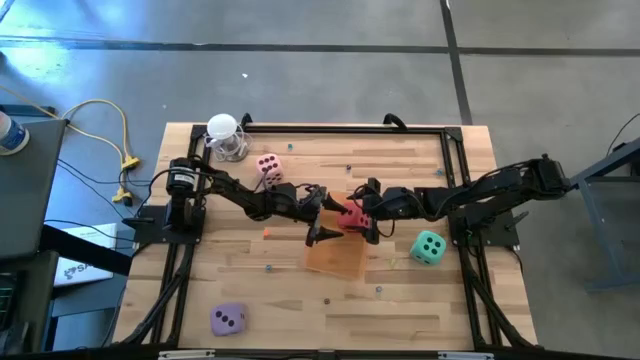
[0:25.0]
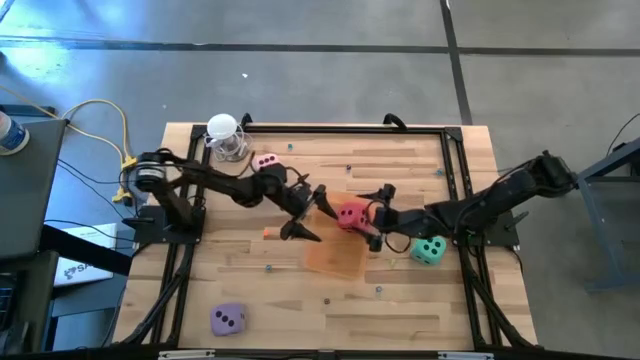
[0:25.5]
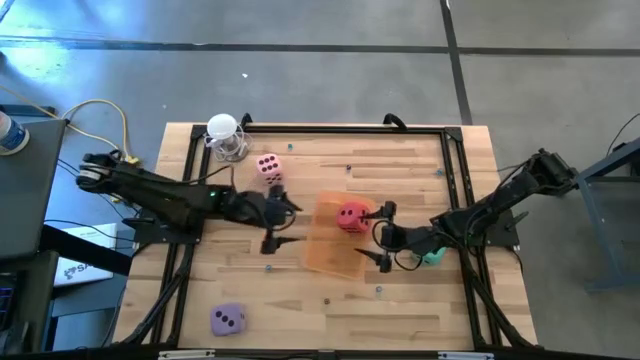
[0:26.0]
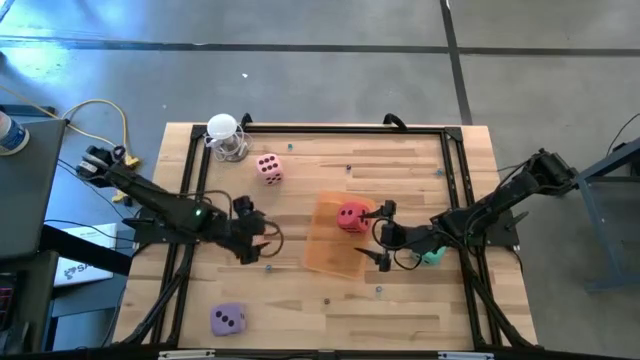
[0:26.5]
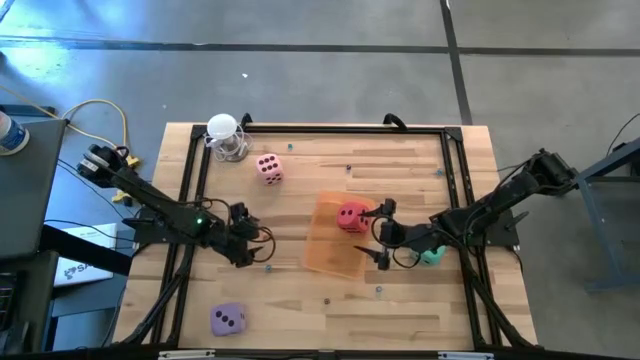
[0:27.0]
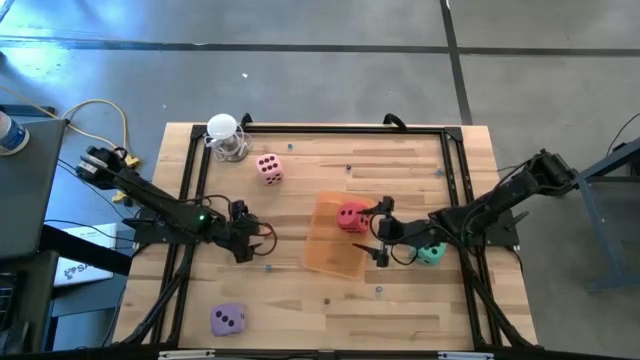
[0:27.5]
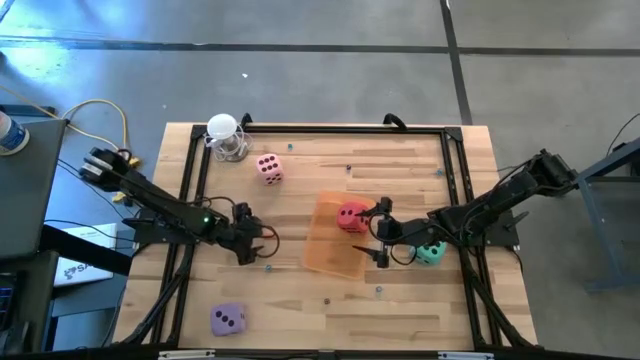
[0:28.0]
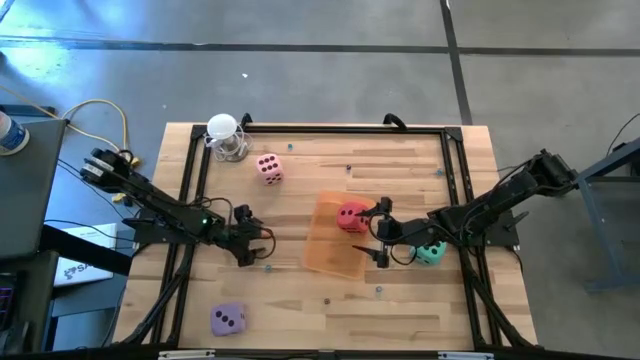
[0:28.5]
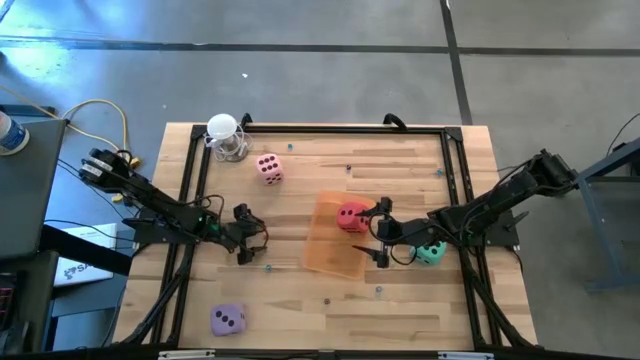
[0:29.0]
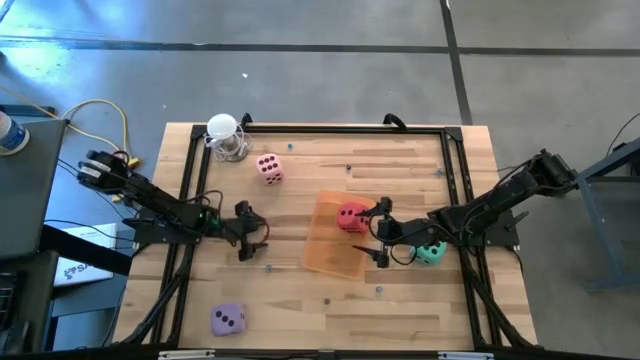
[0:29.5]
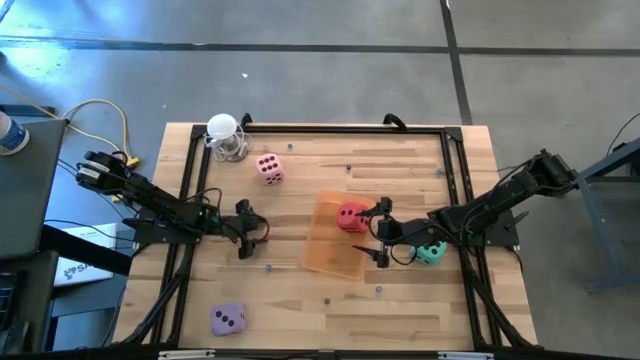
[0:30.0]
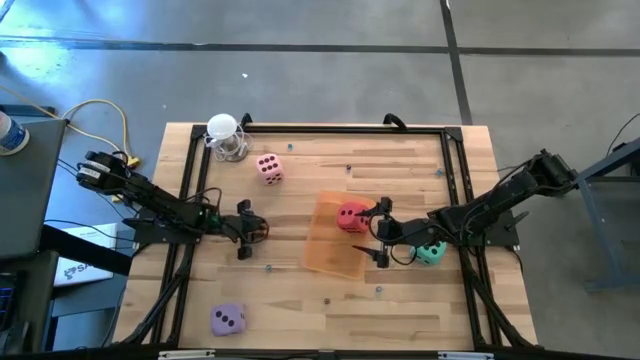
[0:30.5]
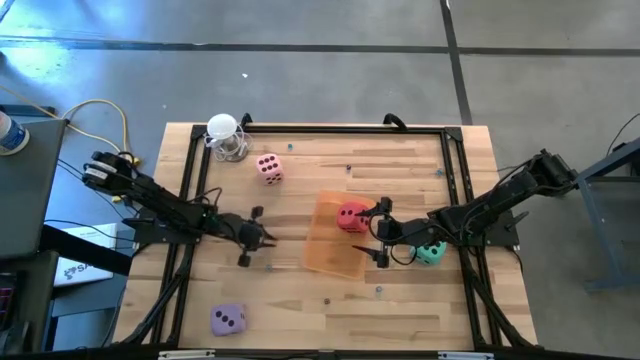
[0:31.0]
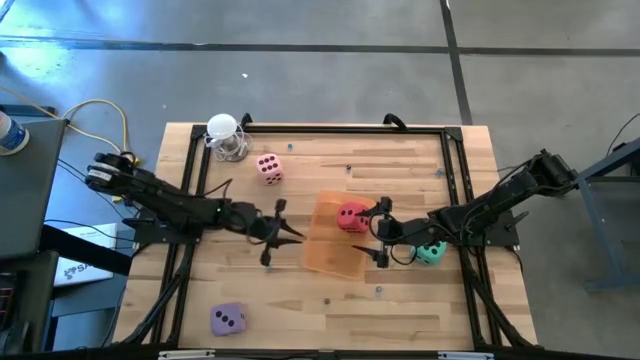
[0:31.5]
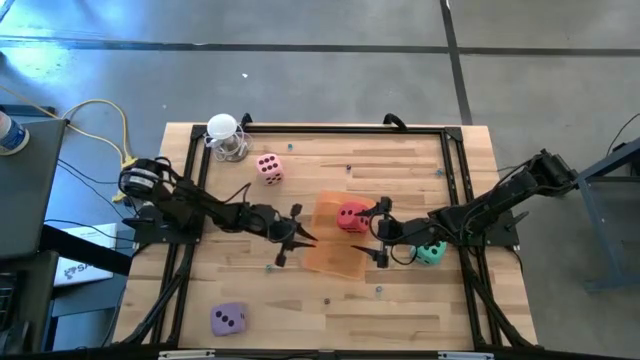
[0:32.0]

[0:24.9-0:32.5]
Task: Pick & Place Dice
Put the small orange die into the orange bin

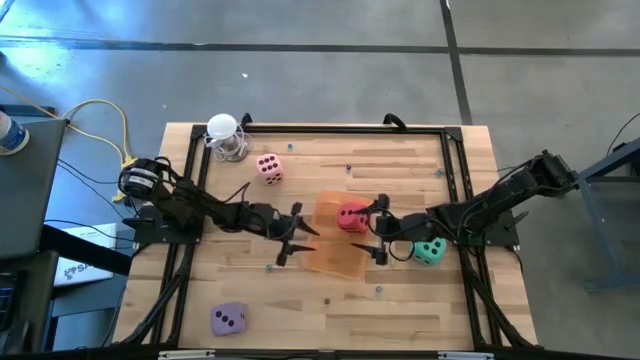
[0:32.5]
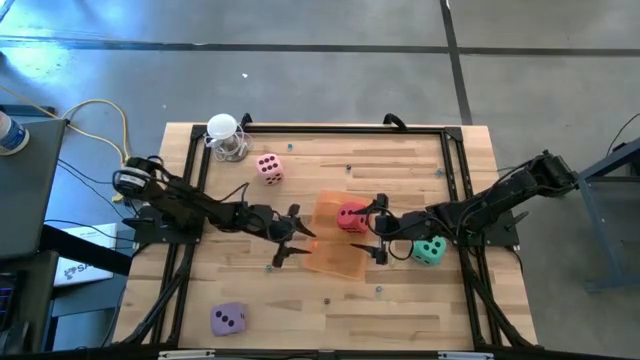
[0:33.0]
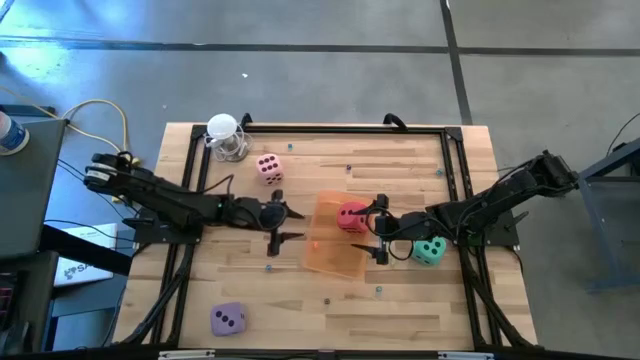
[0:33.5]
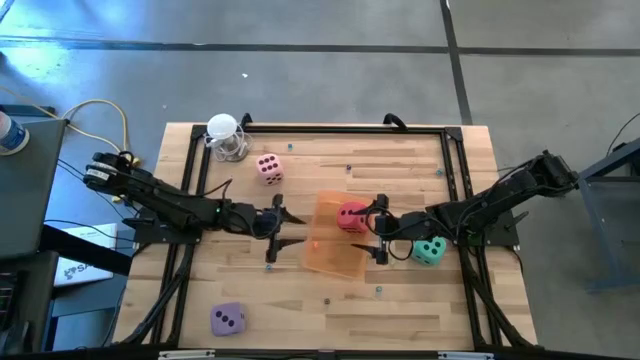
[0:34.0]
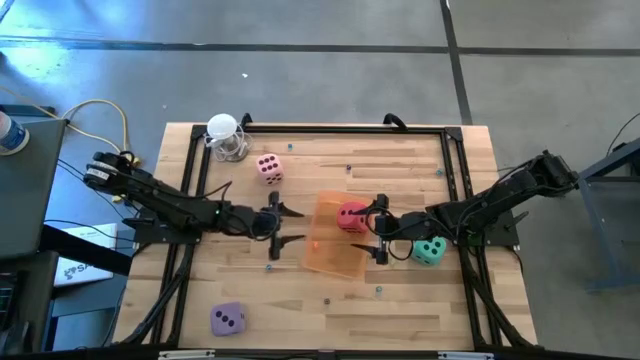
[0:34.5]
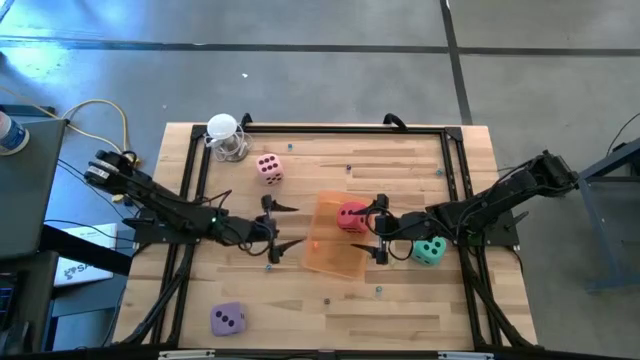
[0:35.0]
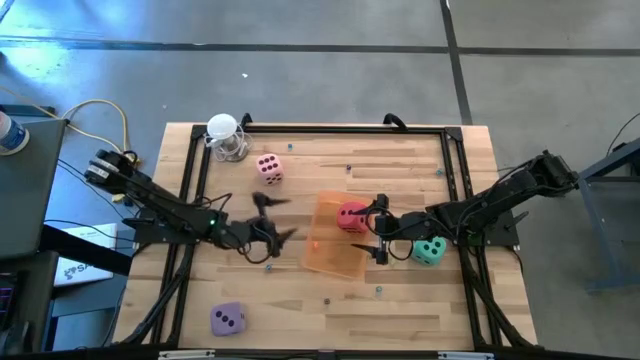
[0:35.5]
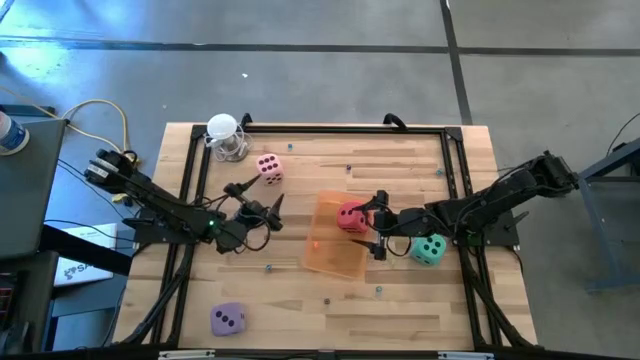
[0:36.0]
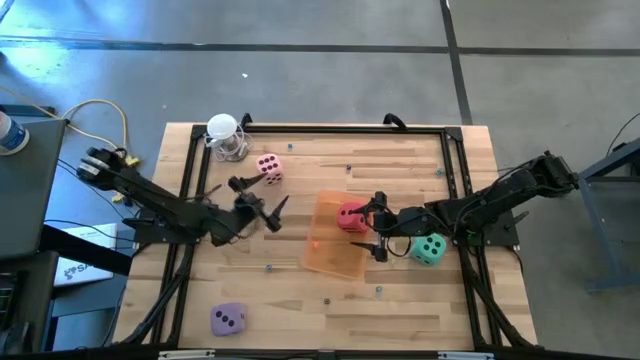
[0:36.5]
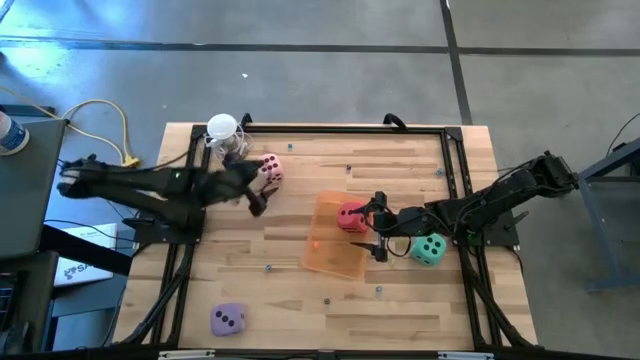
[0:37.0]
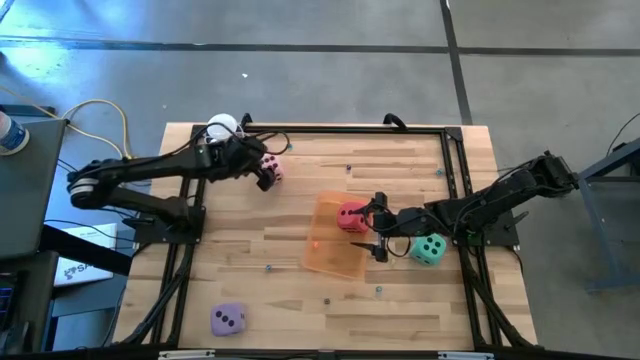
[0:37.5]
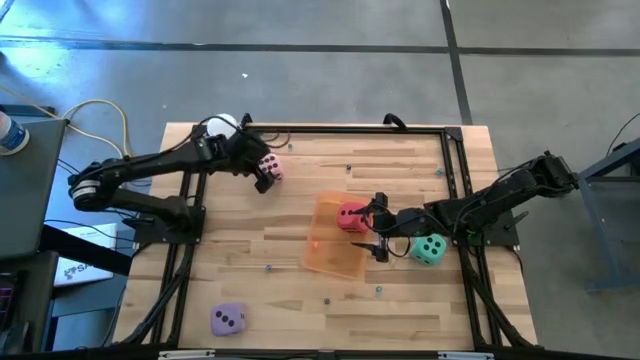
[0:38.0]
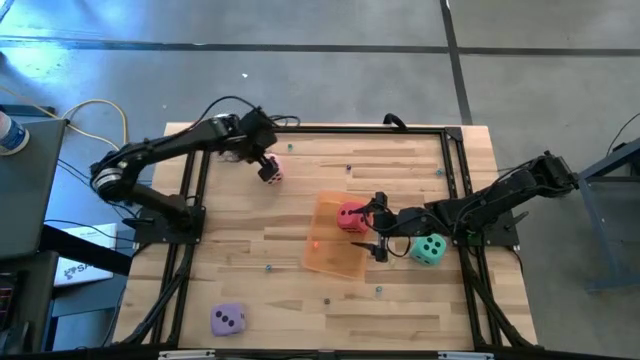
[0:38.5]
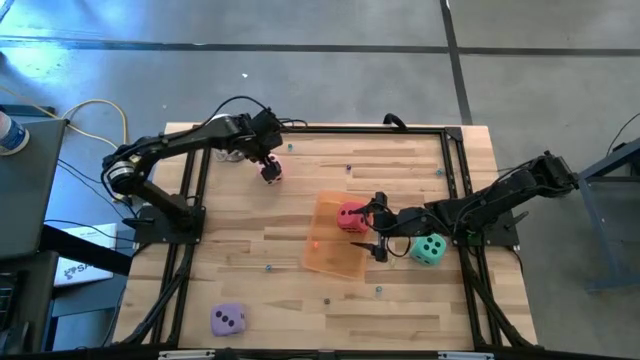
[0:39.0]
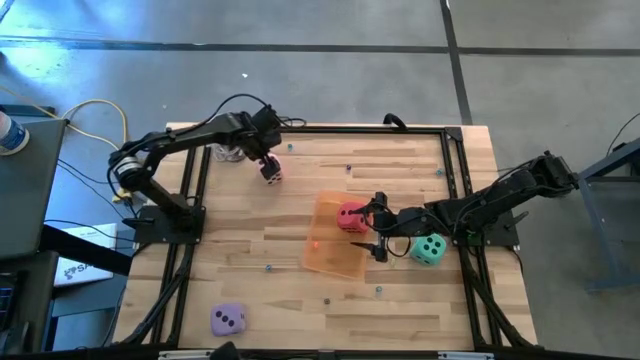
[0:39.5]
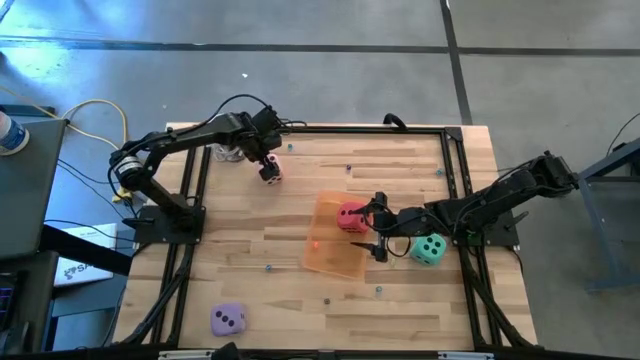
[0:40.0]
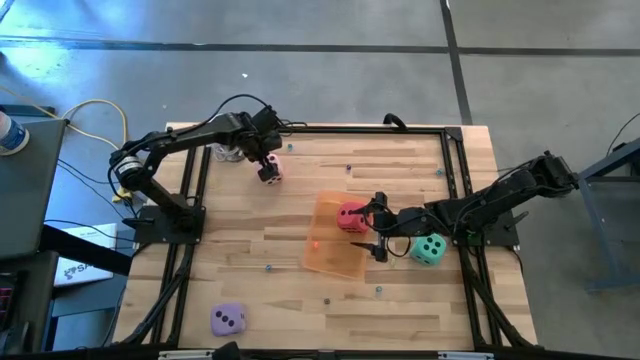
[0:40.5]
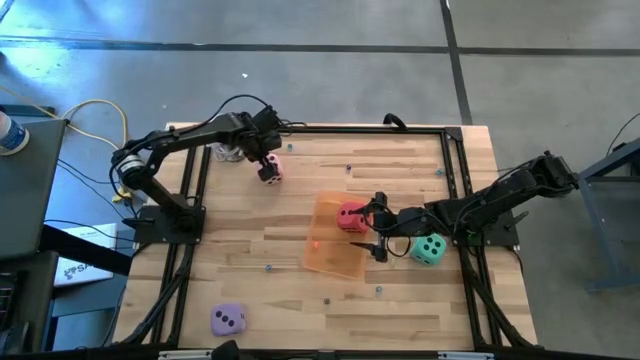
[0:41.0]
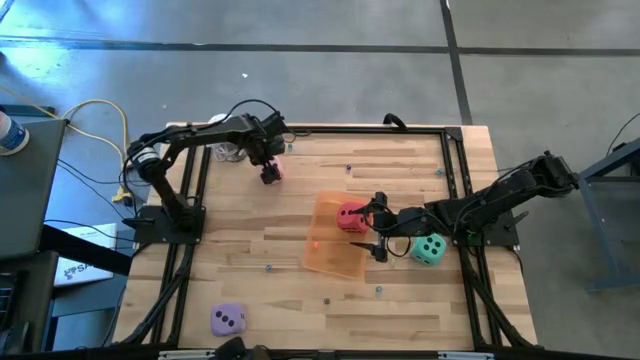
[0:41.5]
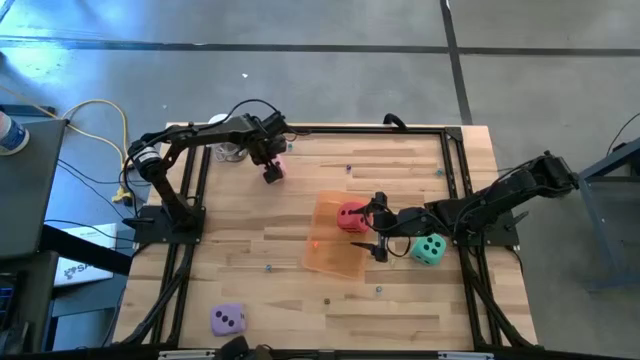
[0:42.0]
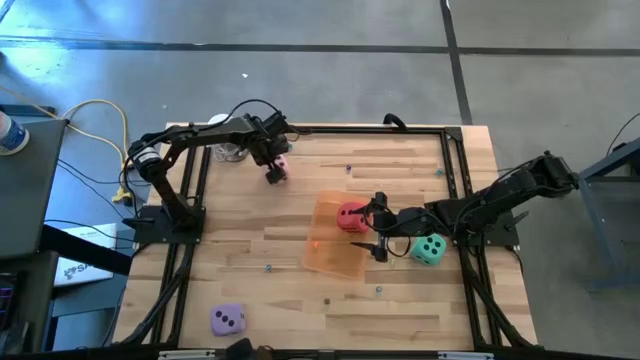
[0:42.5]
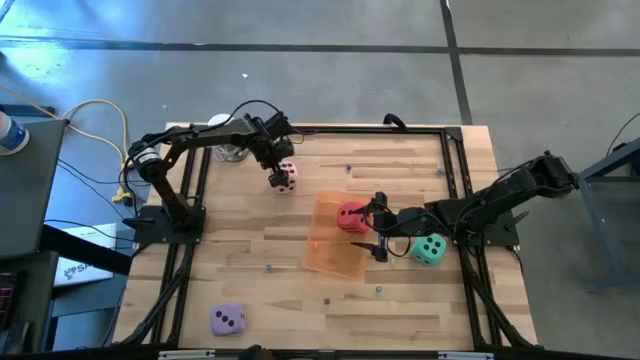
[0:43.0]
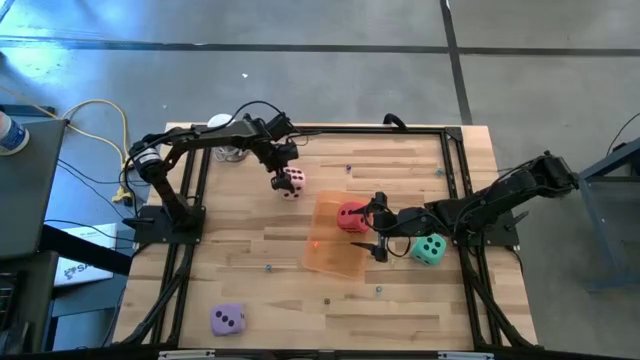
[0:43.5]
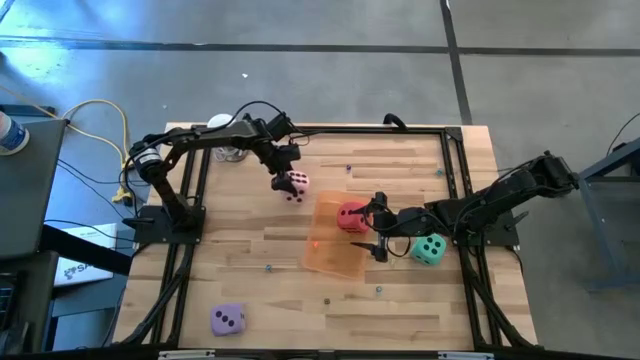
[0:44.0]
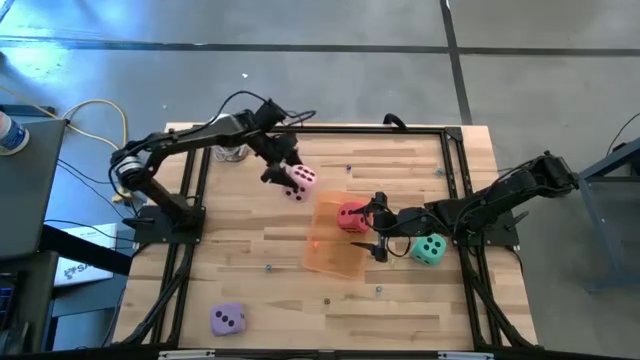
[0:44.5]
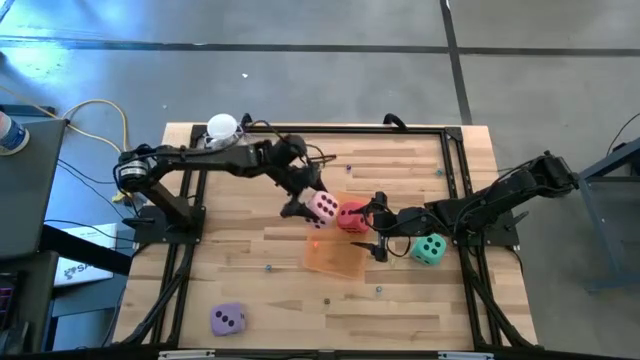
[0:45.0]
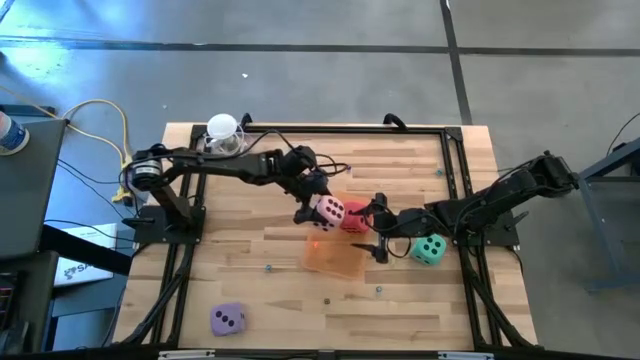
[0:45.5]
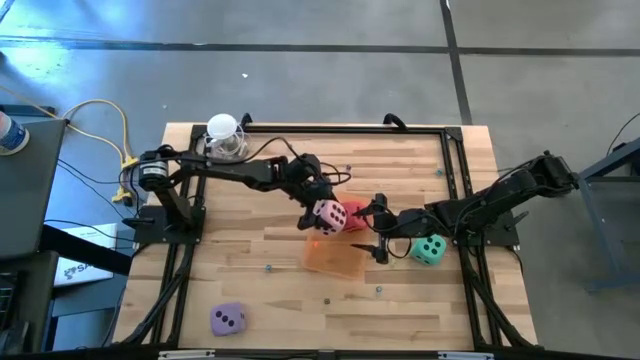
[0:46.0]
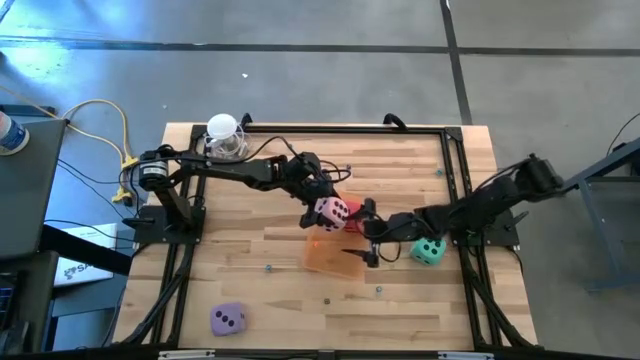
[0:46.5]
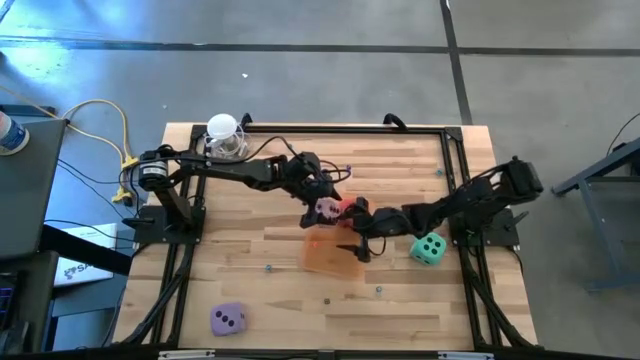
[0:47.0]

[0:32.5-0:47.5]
Put the large pink die into the orange bin
